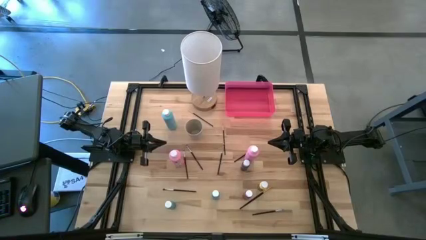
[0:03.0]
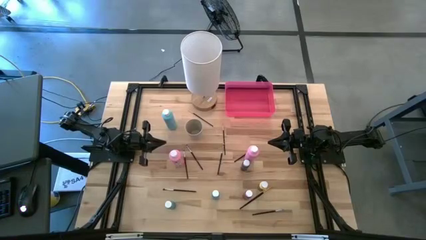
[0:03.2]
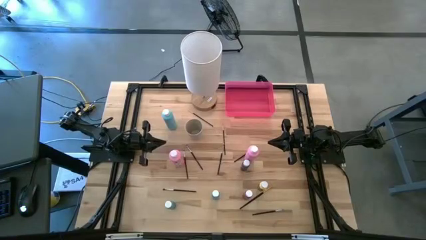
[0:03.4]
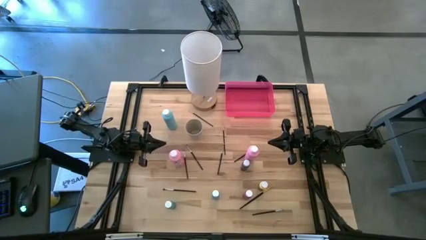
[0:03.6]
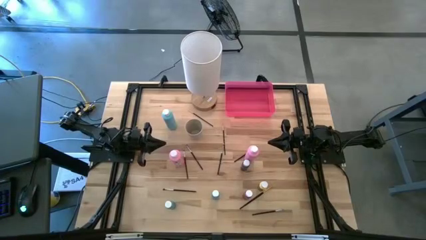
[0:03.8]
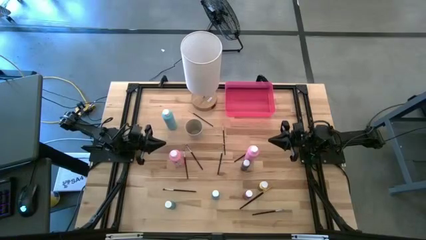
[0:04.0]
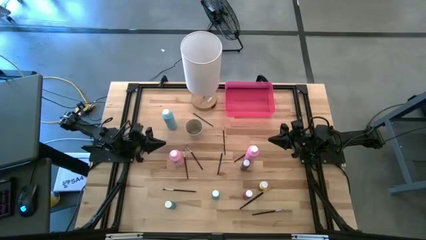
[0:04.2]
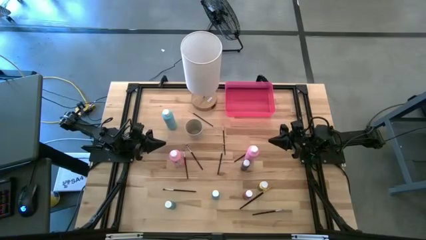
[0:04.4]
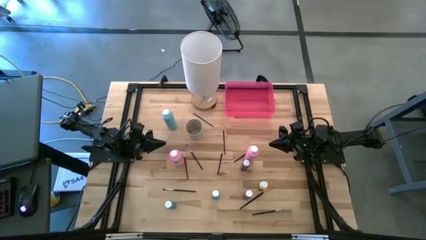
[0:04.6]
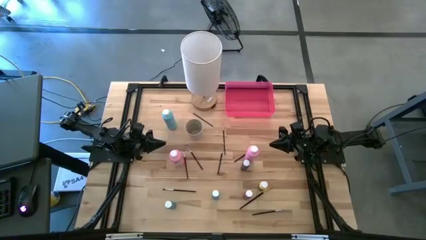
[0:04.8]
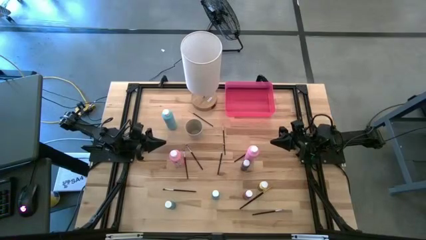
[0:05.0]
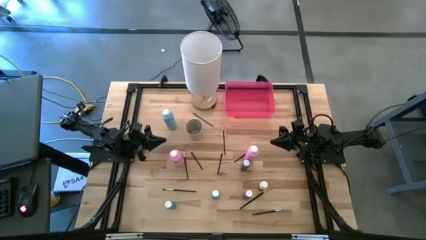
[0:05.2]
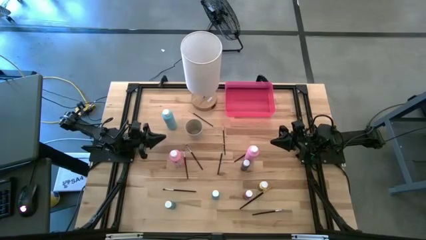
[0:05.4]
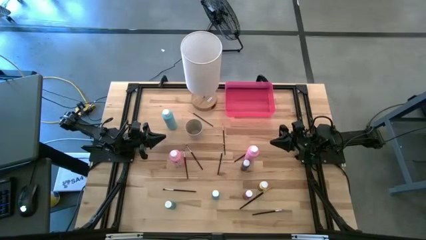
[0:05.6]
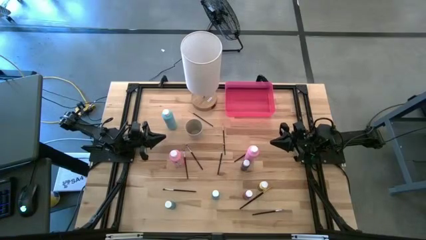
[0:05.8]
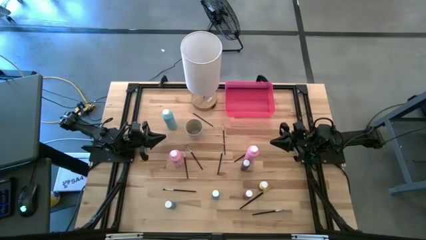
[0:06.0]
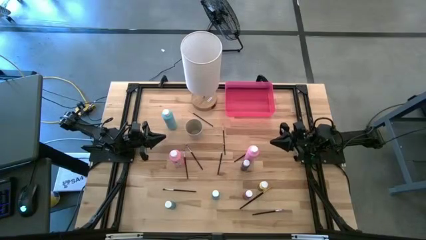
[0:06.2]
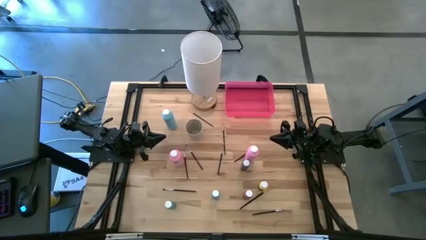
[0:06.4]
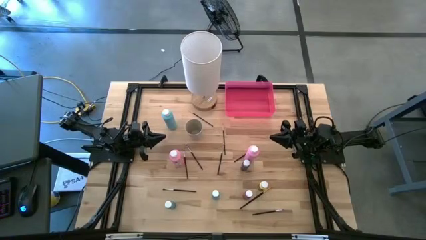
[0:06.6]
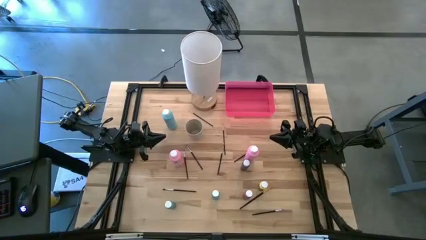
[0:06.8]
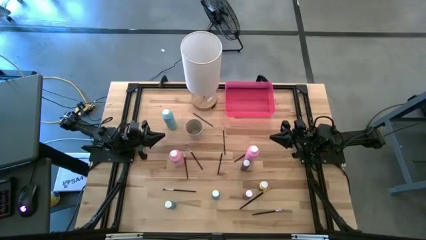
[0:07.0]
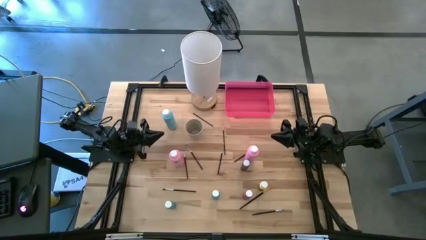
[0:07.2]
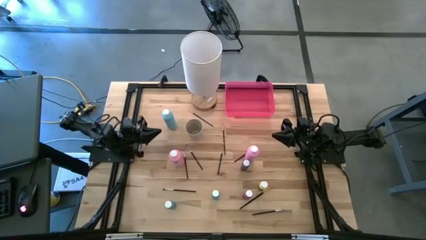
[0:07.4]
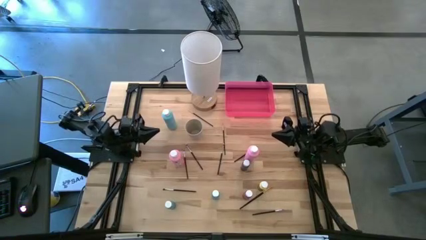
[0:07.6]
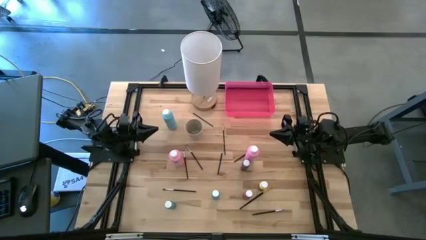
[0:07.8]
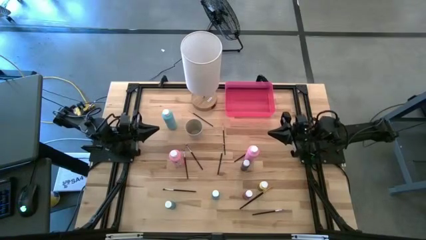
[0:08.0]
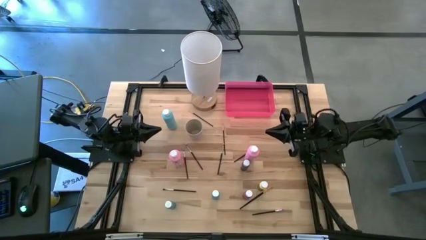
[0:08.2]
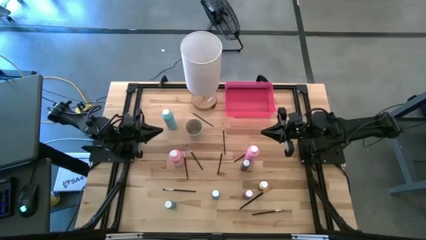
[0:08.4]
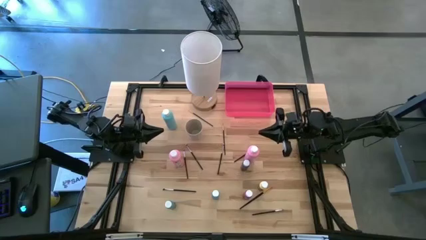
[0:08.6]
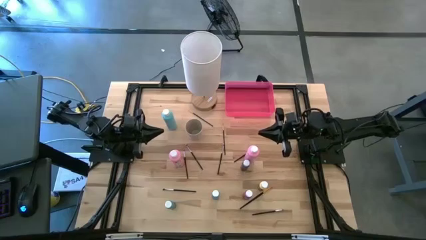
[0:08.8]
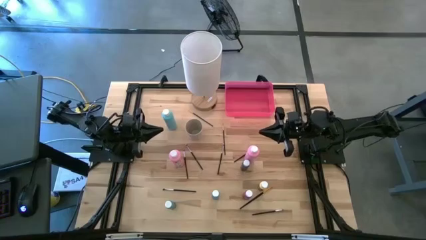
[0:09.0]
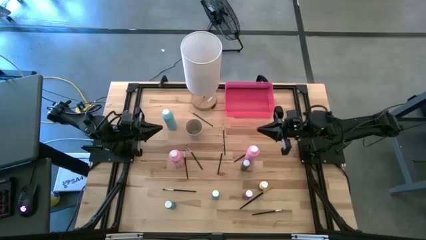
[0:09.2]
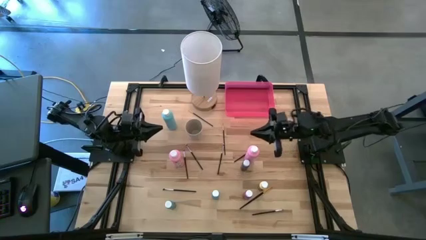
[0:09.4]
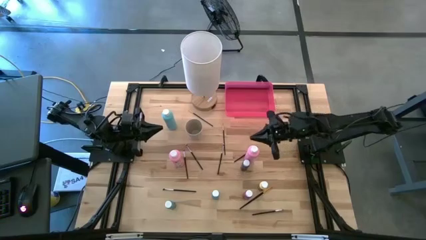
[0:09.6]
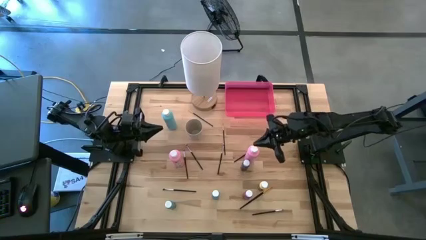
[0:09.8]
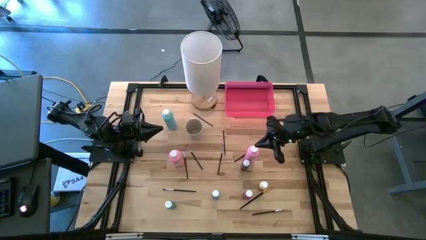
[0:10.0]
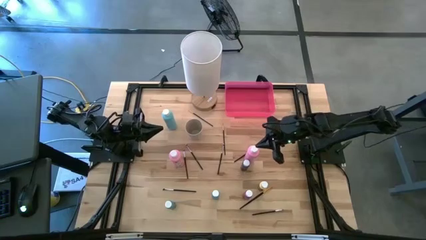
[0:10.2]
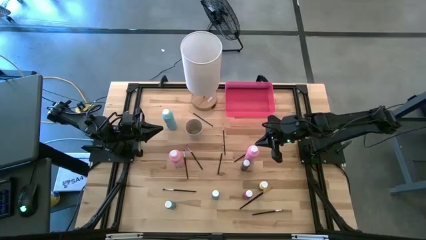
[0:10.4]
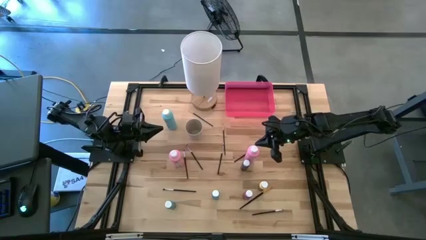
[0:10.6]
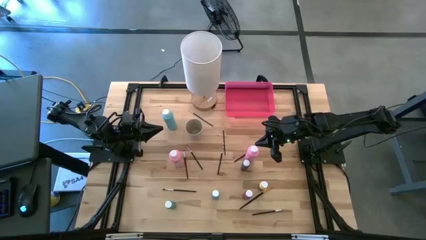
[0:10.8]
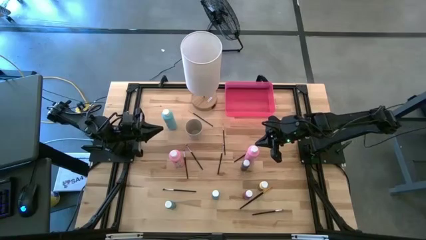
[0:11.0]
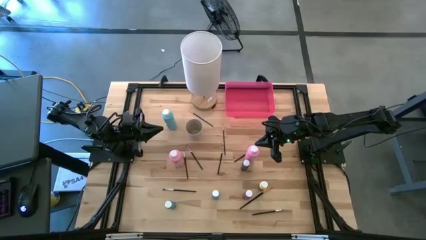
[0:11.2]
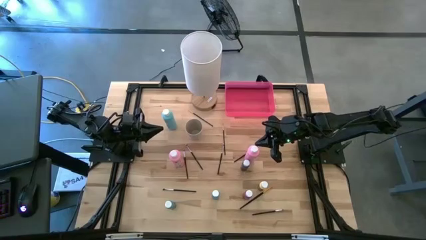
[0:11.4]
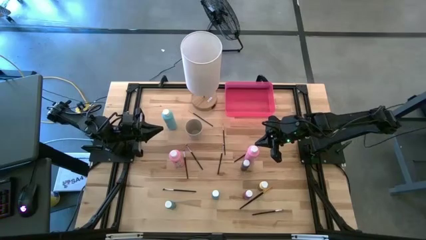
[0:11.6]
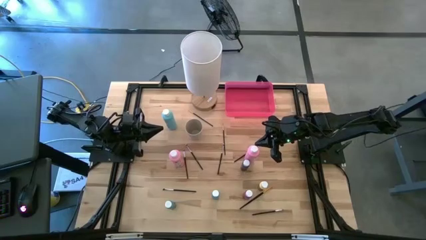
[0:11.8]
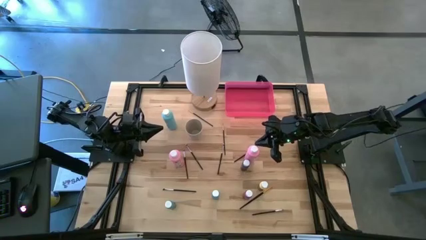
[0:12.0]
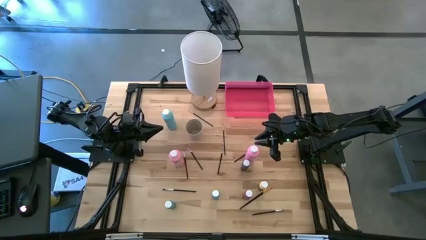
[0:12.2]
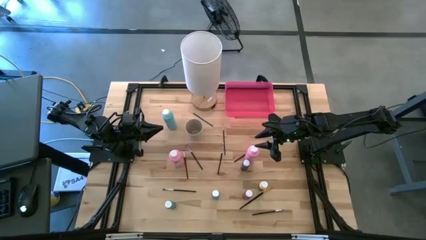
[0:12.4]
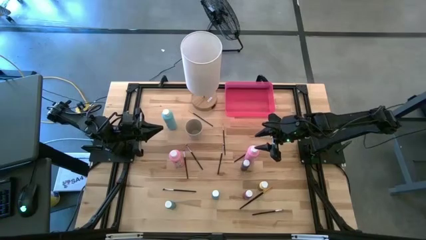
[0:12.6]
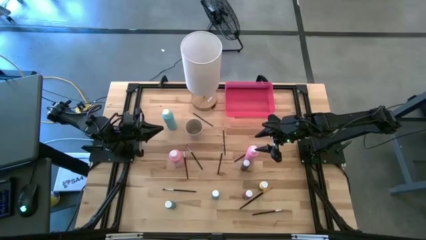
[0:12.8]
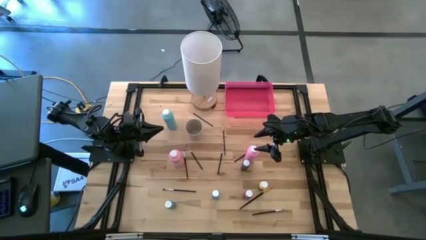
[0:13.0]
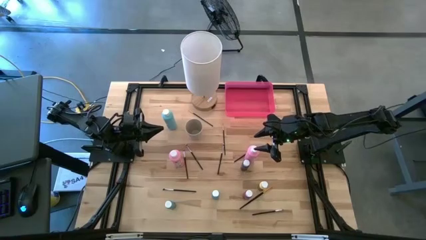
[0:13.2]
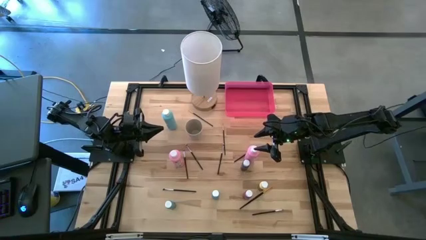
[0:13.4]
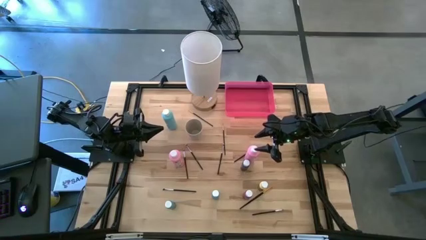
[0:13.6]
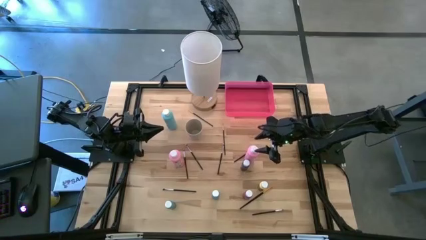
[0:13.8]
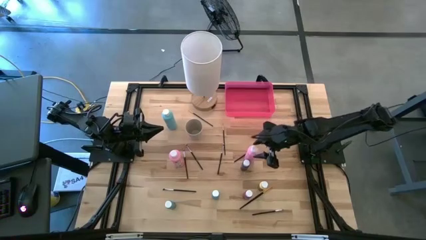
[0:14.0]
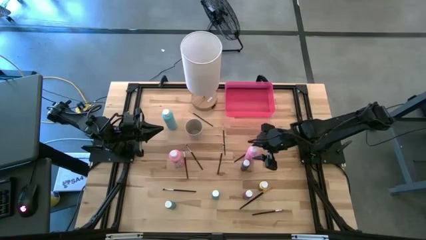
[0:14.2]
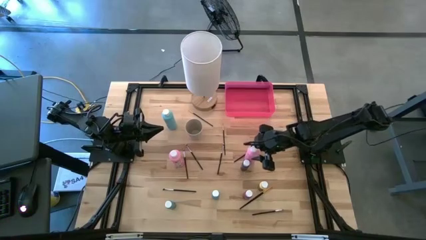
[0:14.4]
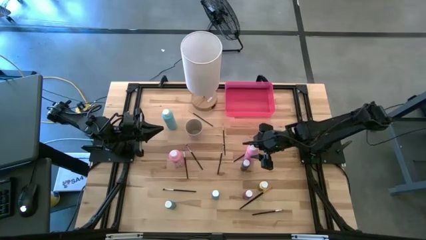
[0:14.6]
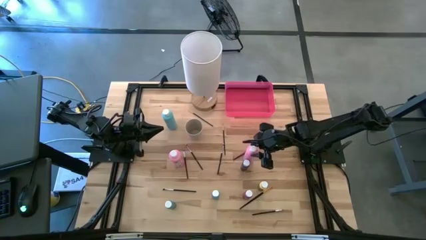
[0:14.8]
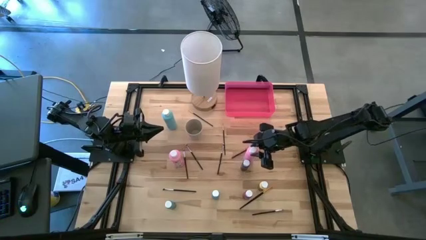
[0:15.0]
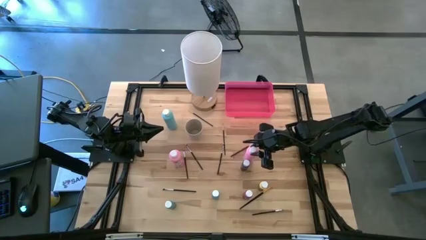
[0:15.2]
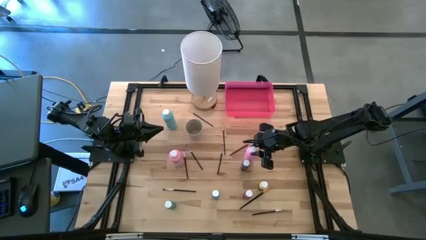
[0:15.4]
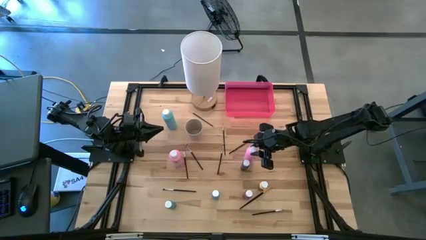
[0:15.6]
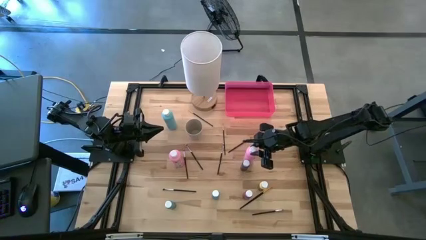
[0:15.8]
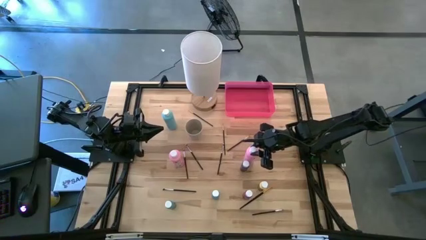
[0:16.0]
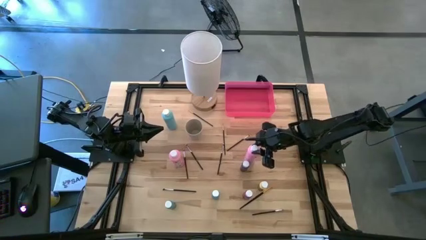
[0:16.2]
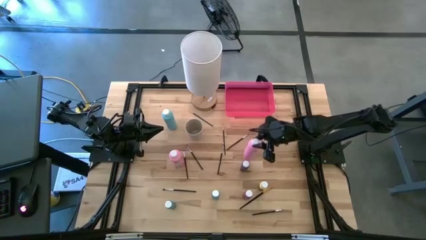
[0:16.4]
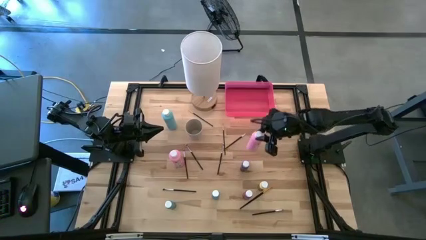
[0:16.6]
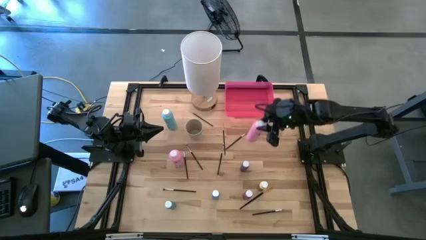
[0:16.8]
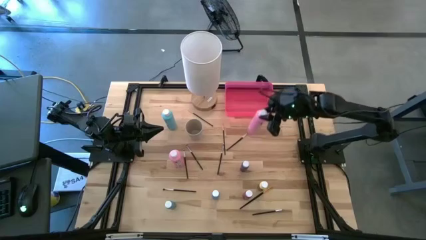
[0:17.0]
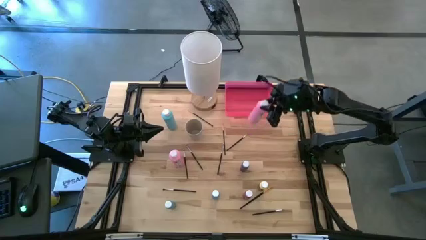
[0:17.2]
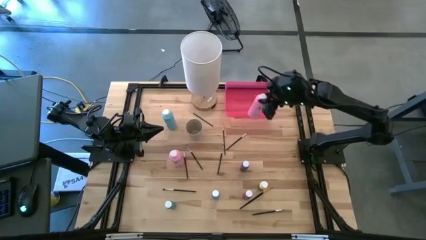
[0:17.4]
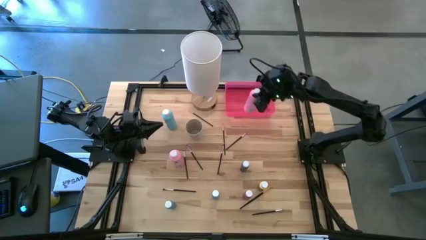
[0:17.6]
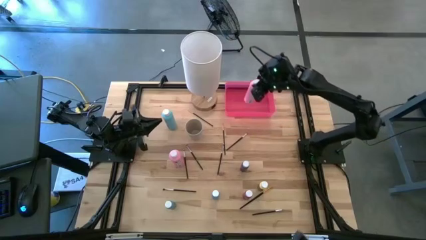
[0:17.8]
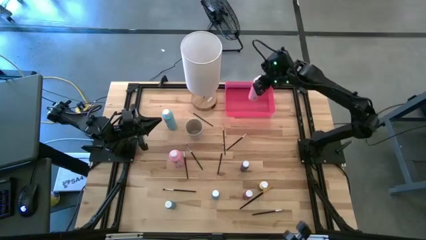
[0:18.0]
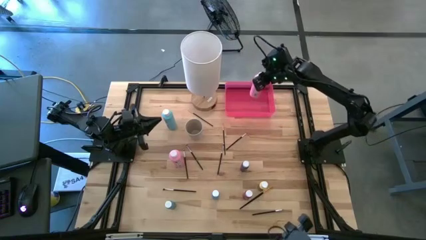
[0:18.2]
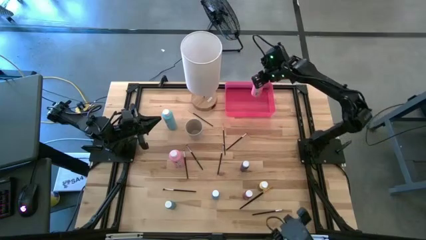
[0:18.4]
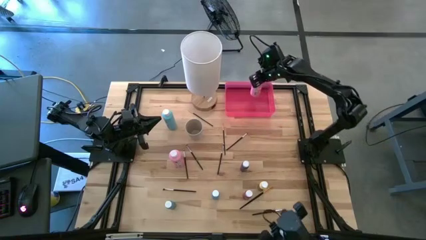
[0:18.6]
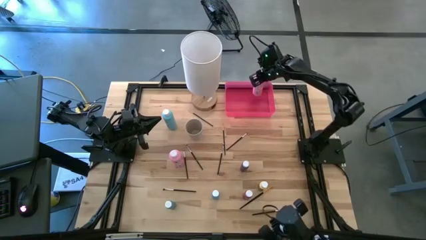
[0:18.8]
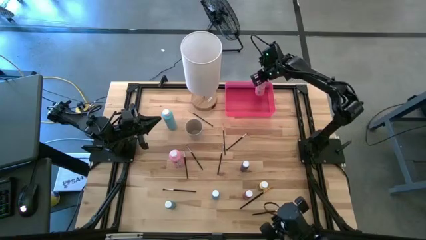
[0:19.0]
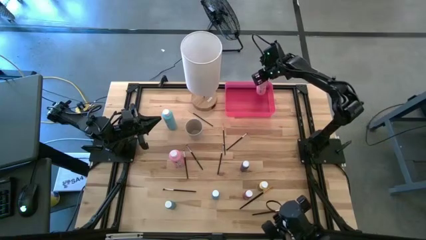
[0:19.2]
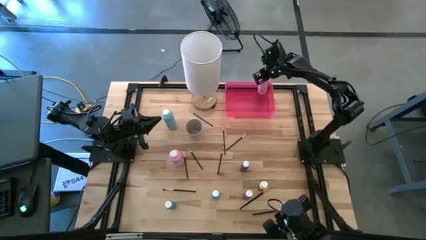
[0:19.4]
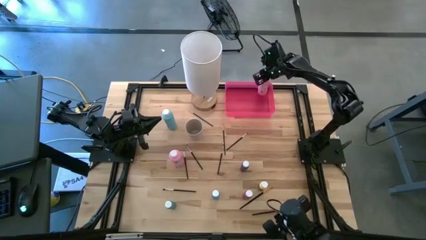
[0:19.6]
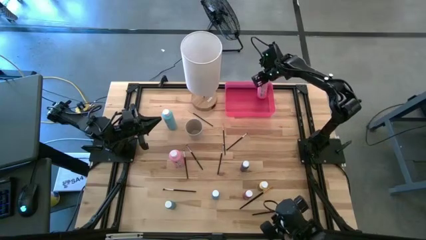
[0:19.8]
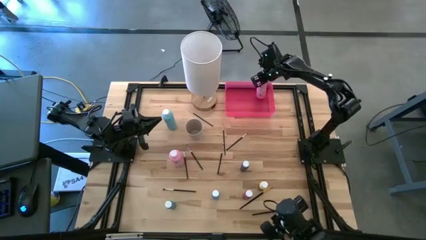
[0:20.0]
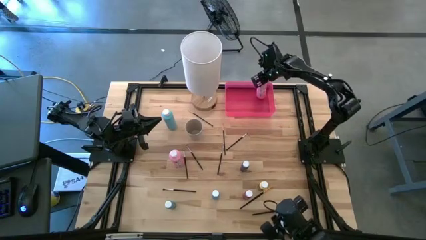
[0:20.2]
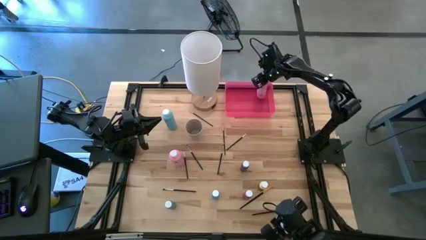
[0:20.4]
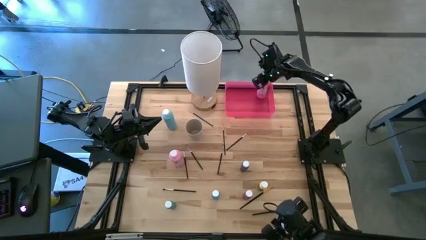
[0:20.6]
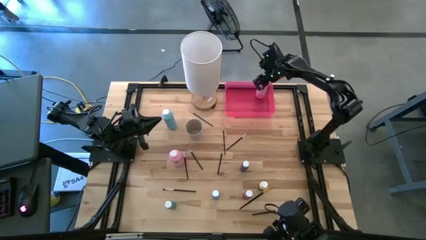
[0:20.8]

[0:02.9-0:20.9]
Task: Pick & Place Paint Supplies
Put the big pink paint bottle into the pink bin
